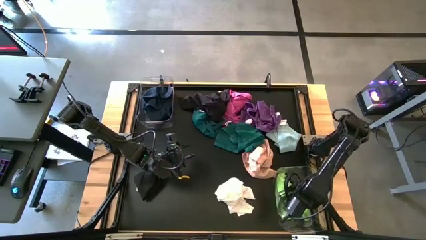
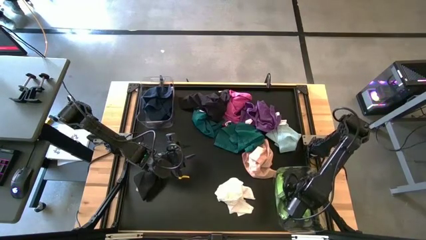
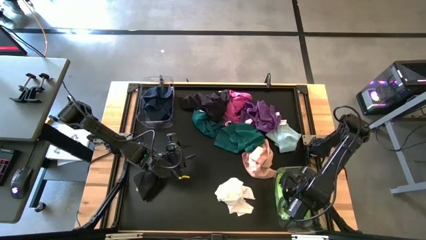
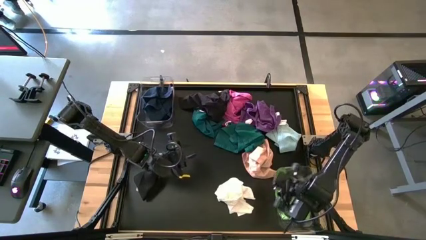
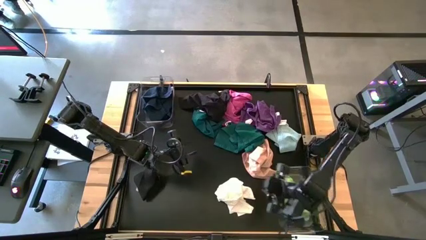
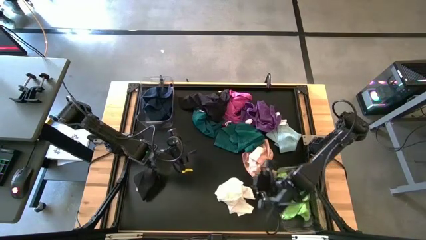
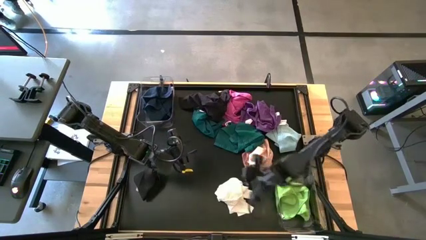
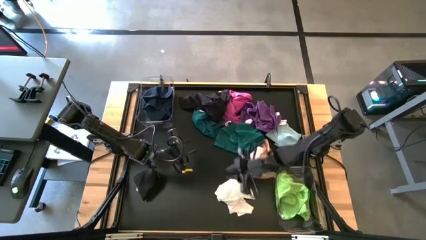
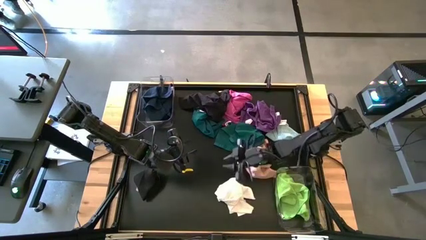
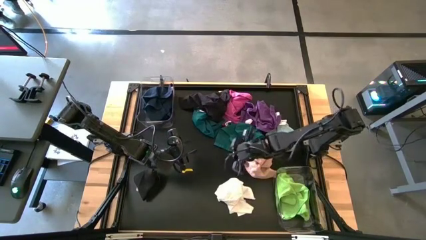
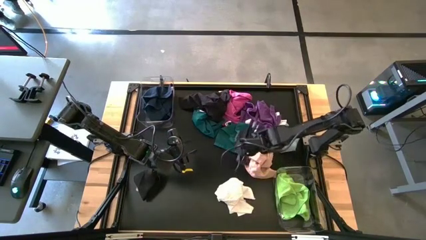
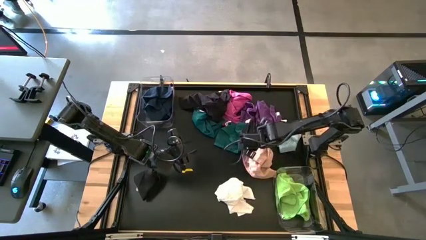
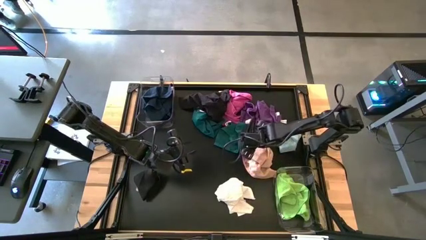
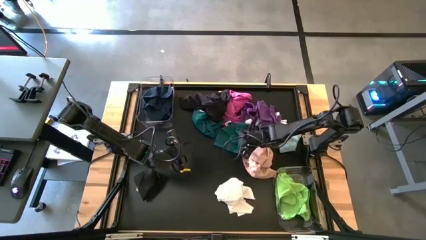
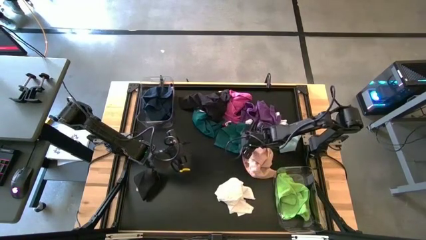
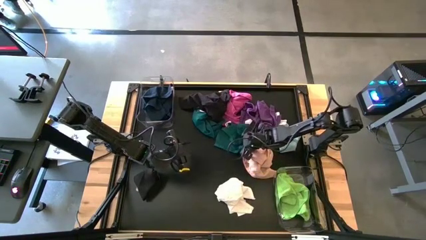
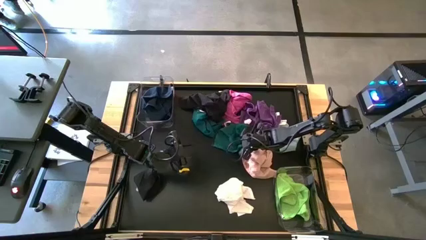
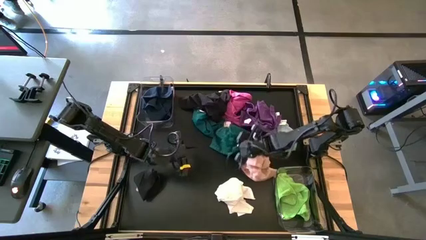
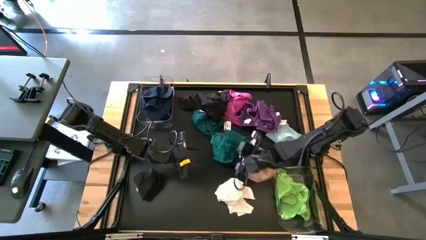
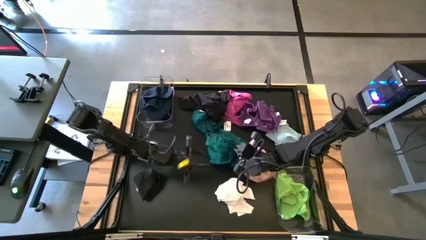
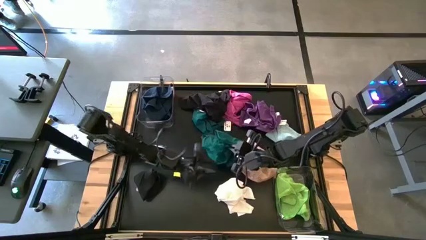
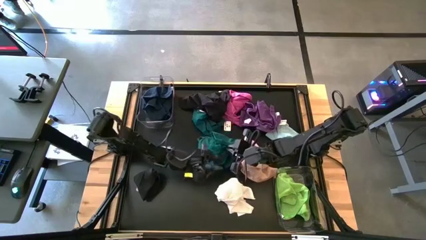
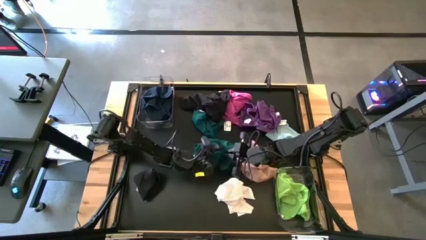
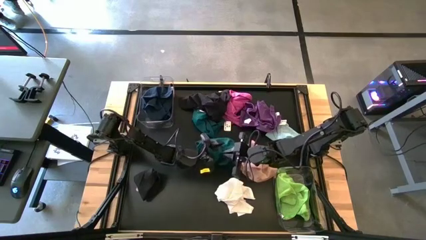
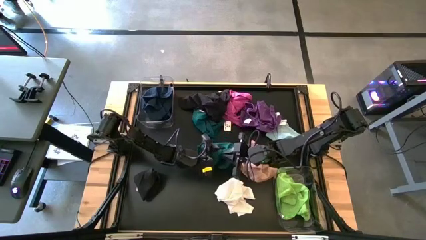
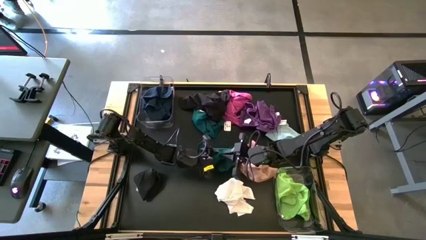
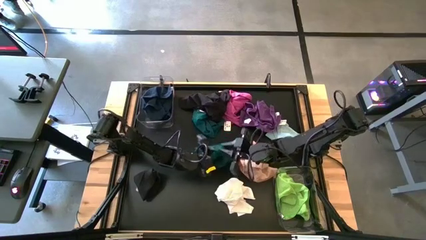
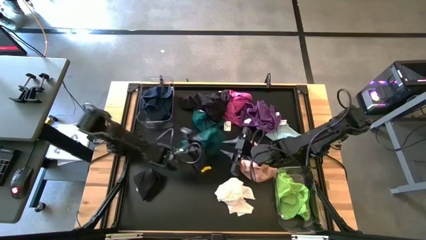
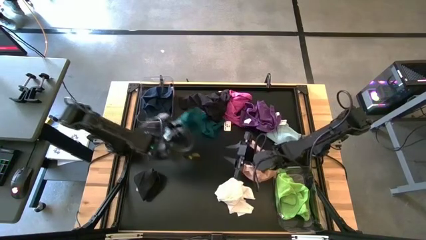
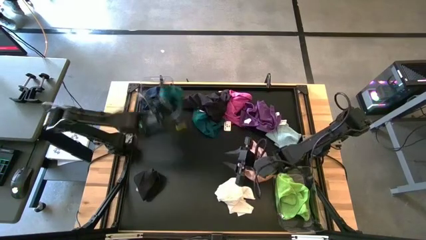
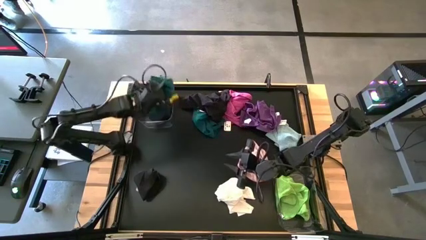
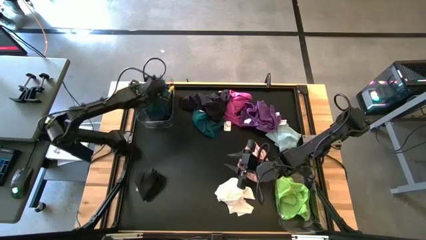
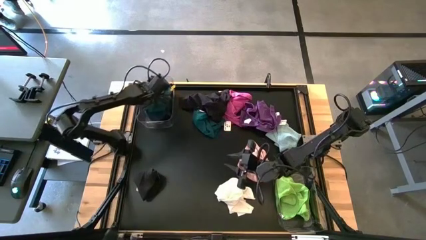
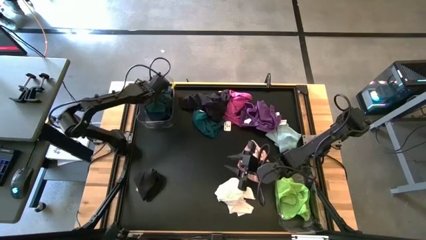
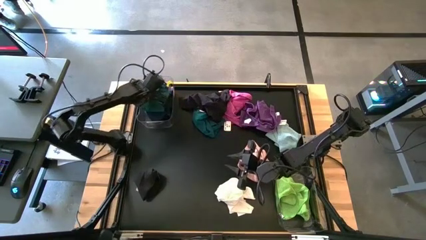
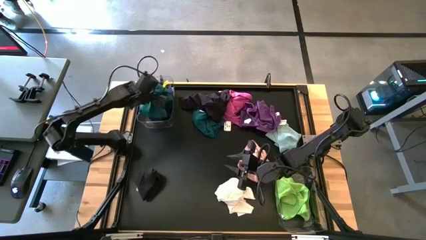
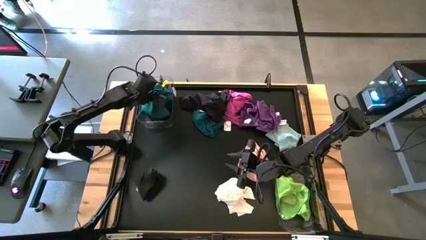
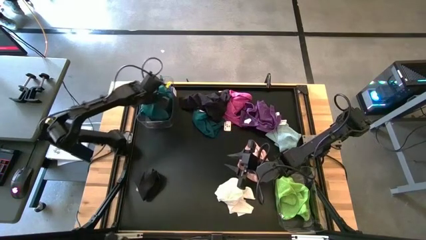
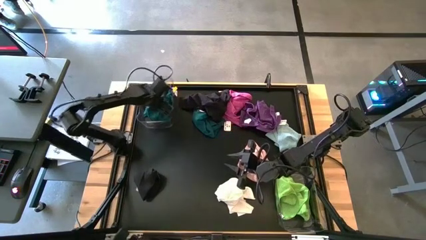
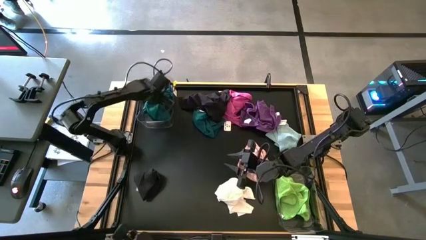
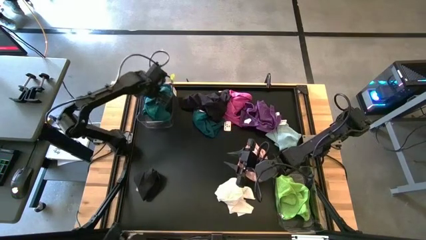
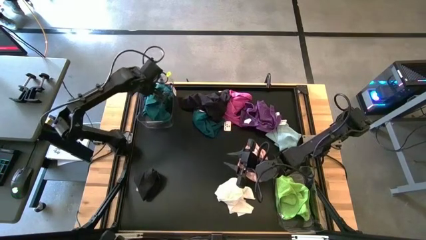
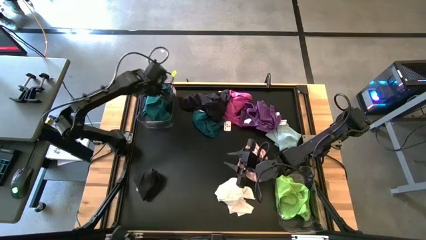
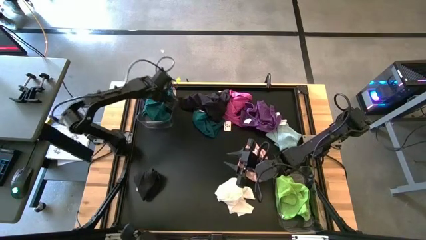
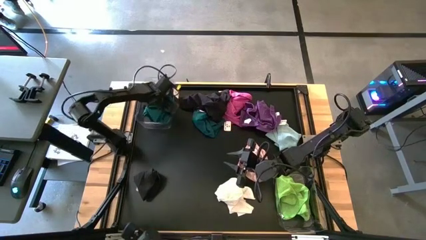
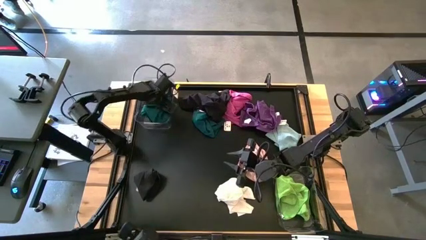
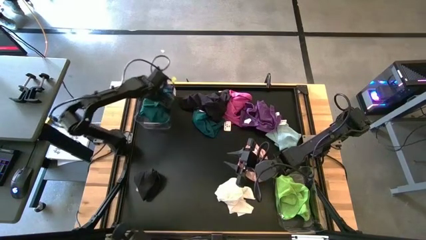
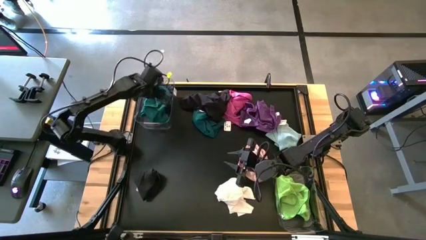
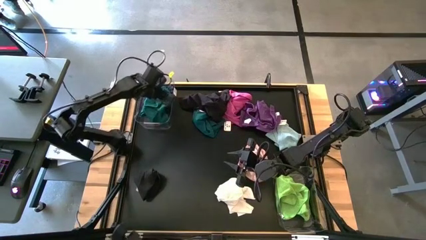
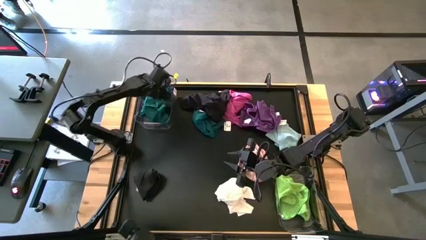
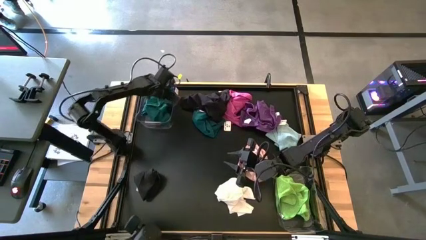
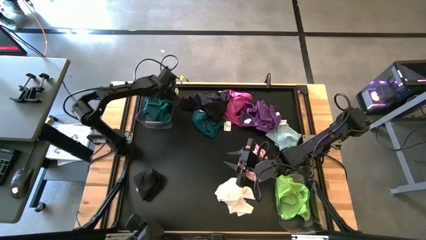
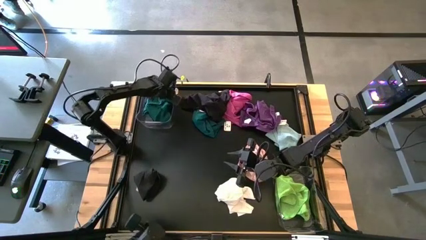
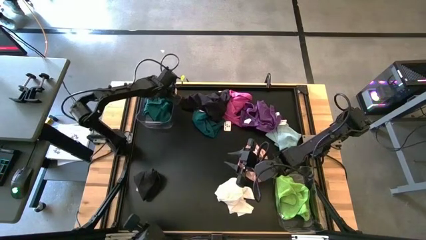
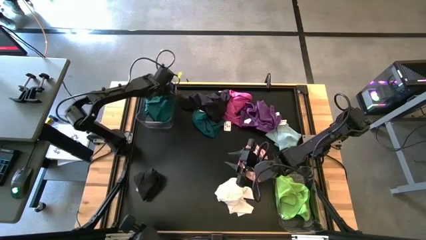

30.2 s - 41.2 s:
Task: Sort towels by color in basket
Put the dark green towel into the top transparent bin
